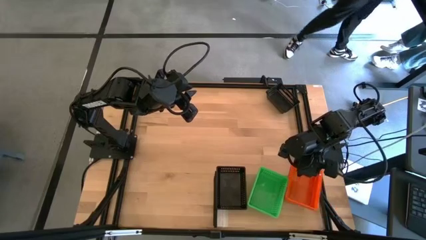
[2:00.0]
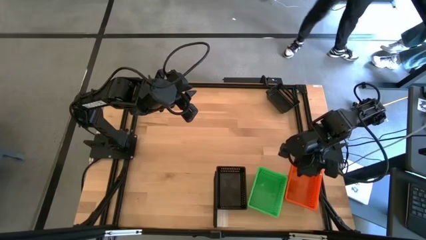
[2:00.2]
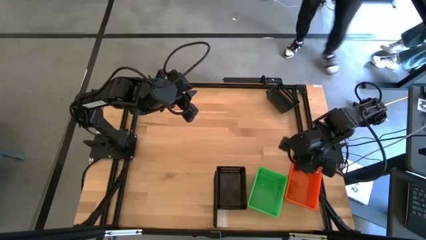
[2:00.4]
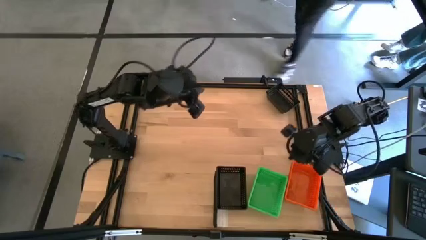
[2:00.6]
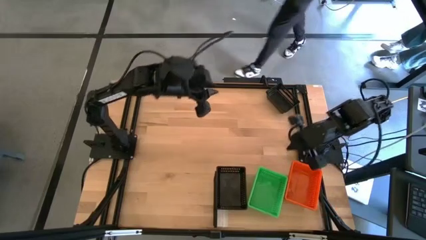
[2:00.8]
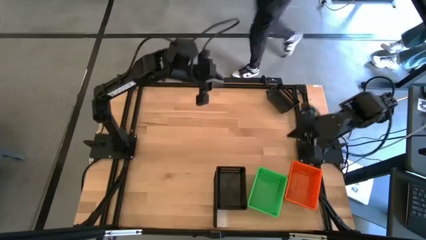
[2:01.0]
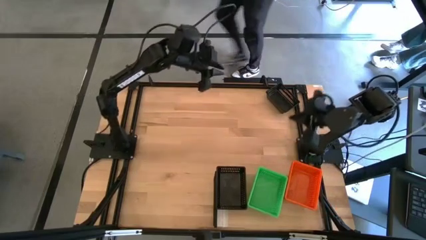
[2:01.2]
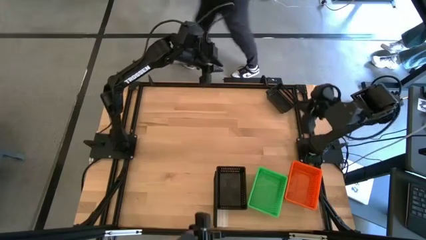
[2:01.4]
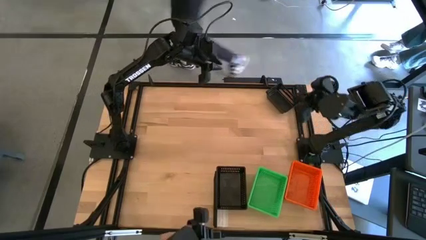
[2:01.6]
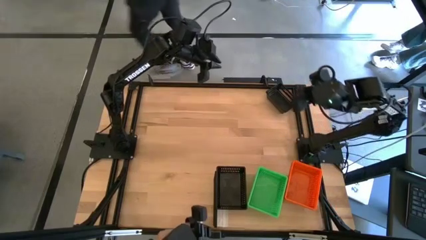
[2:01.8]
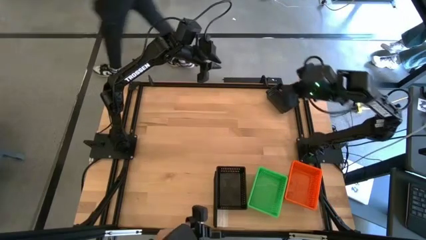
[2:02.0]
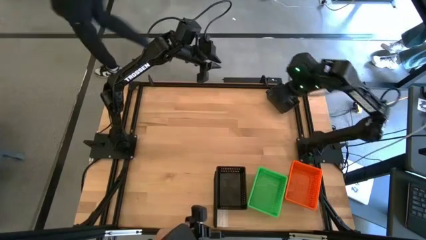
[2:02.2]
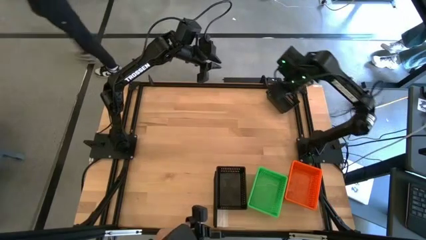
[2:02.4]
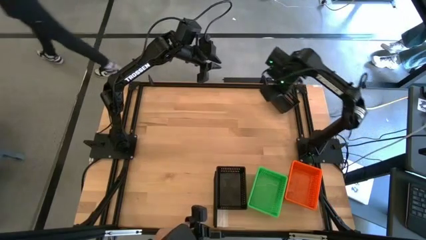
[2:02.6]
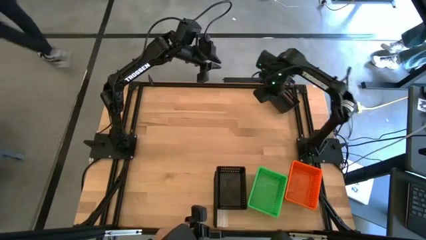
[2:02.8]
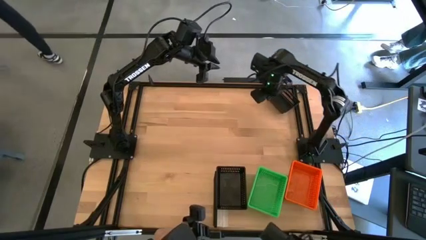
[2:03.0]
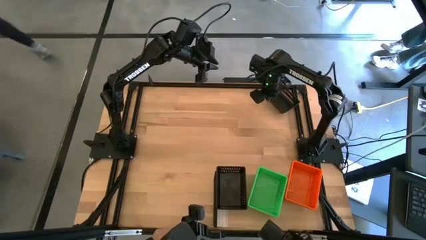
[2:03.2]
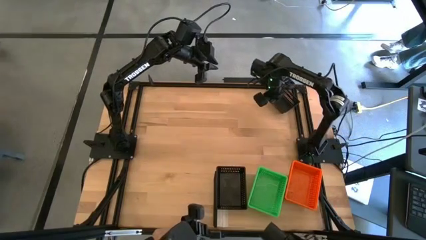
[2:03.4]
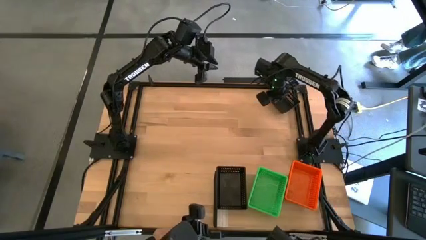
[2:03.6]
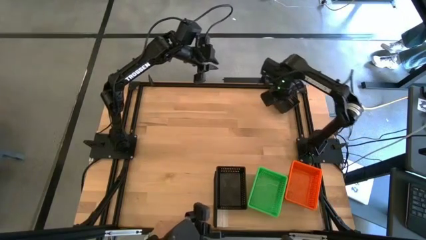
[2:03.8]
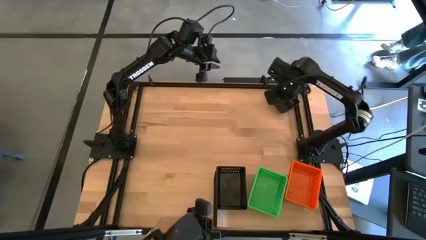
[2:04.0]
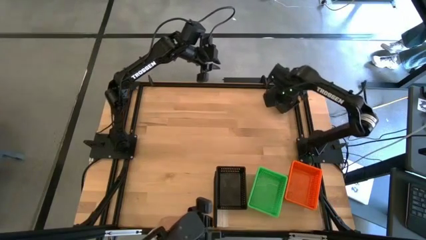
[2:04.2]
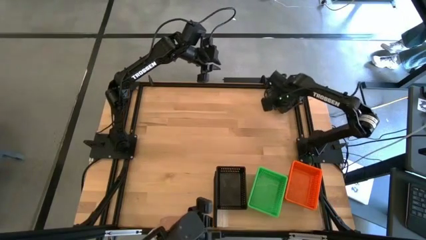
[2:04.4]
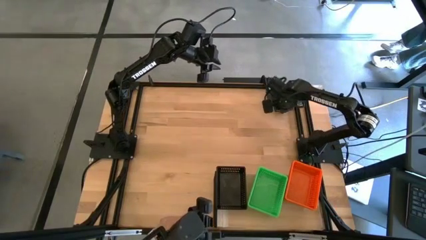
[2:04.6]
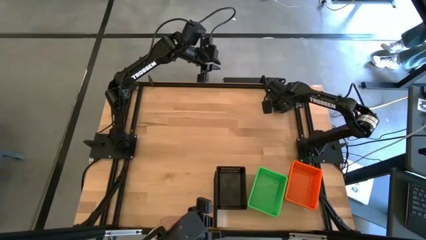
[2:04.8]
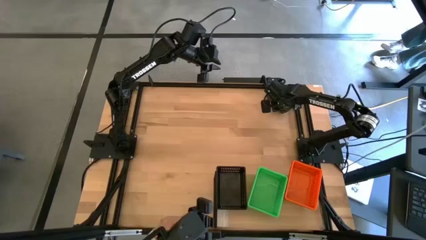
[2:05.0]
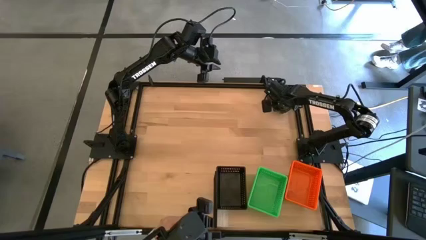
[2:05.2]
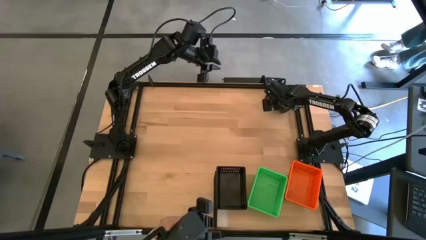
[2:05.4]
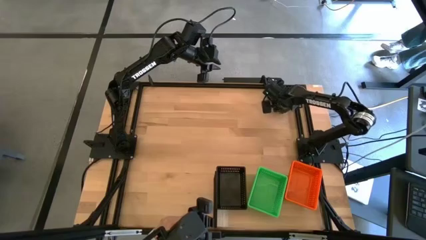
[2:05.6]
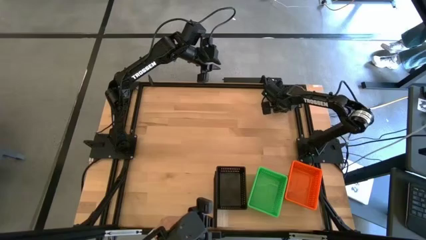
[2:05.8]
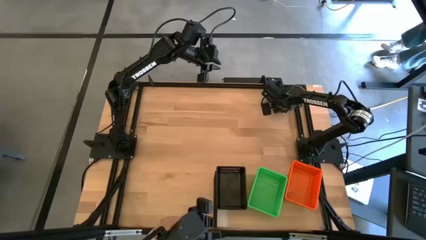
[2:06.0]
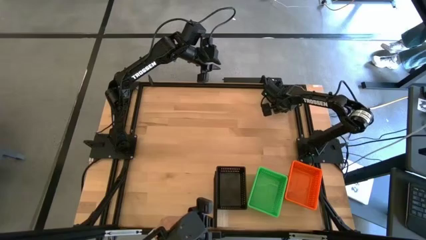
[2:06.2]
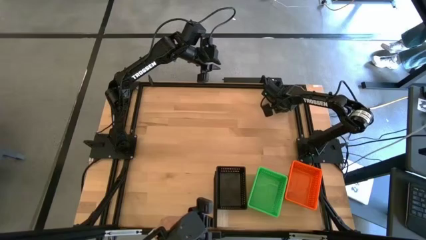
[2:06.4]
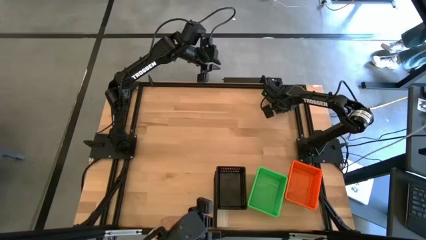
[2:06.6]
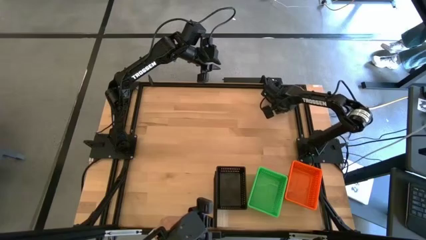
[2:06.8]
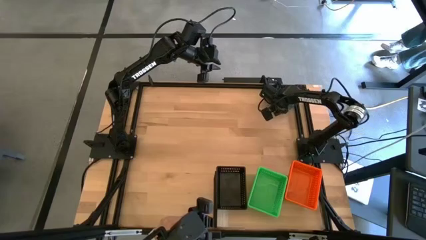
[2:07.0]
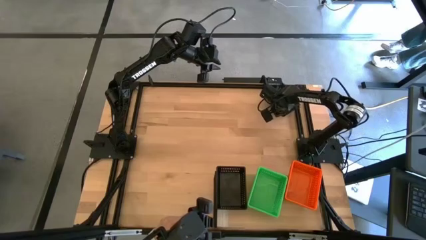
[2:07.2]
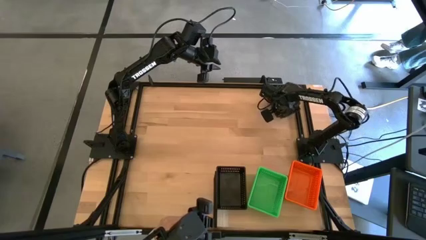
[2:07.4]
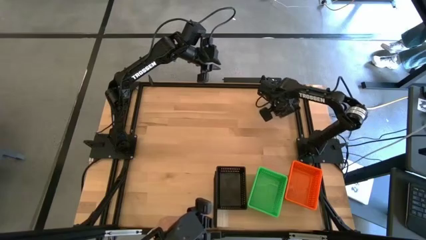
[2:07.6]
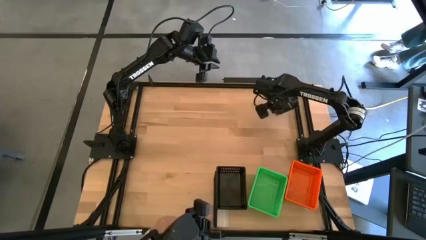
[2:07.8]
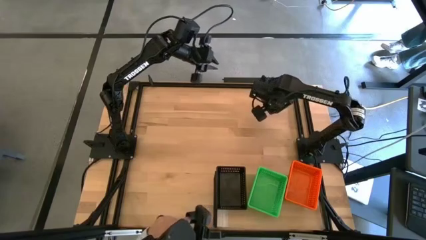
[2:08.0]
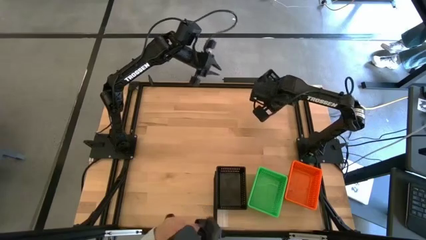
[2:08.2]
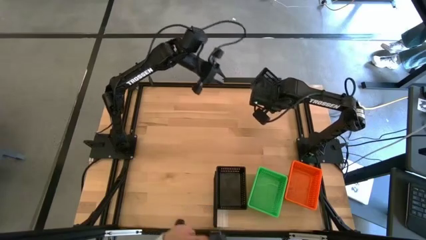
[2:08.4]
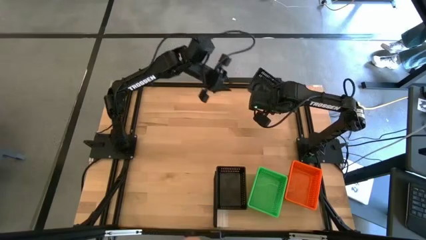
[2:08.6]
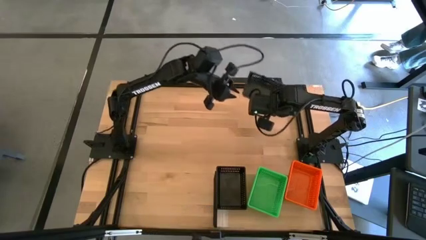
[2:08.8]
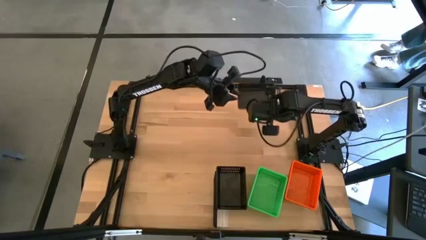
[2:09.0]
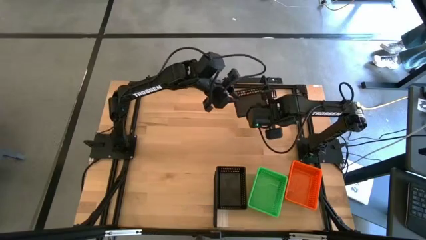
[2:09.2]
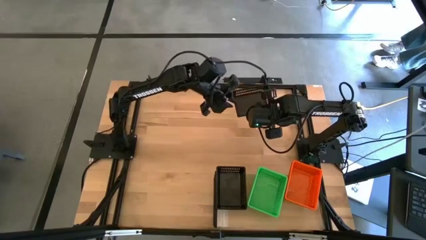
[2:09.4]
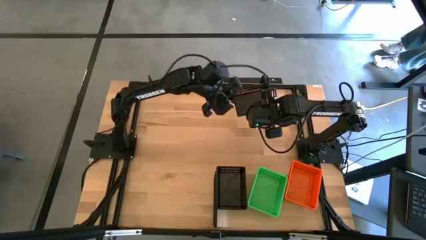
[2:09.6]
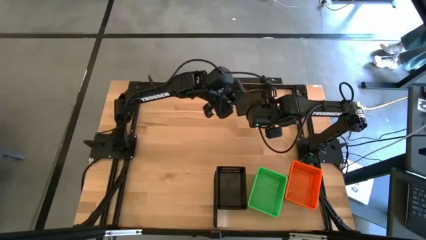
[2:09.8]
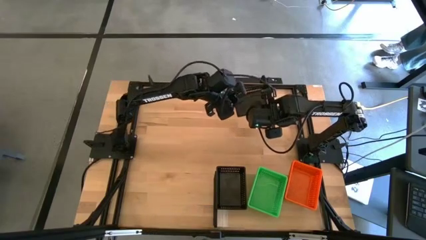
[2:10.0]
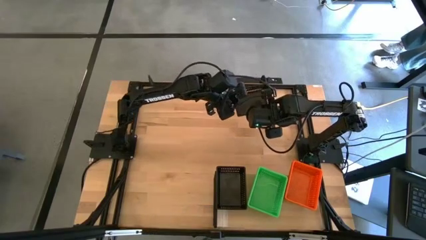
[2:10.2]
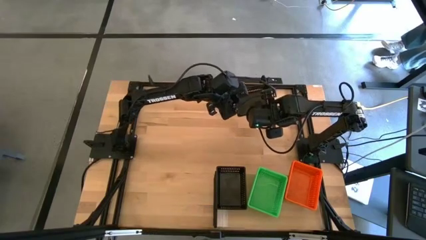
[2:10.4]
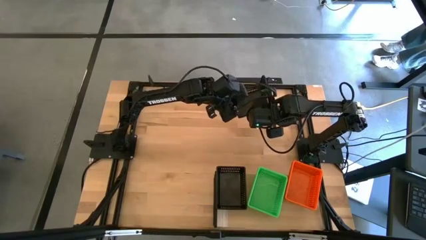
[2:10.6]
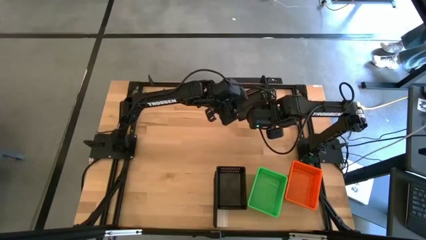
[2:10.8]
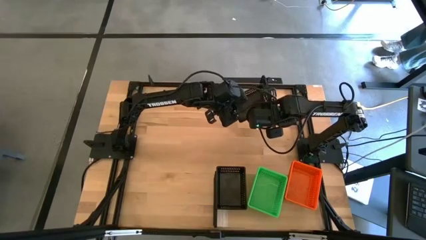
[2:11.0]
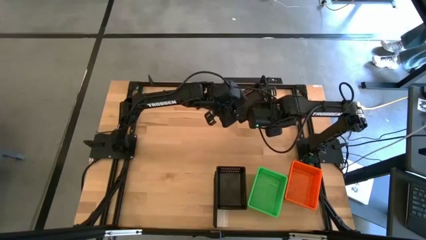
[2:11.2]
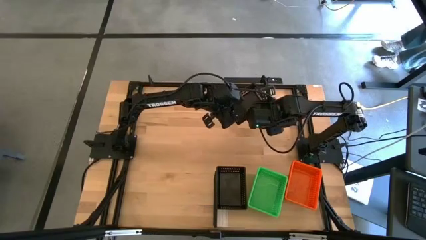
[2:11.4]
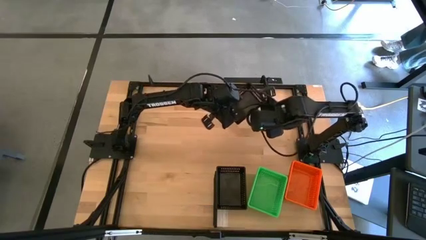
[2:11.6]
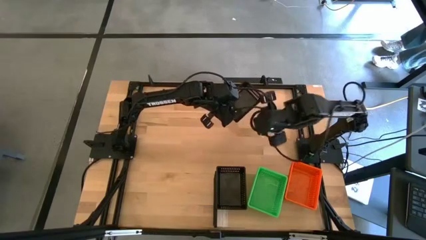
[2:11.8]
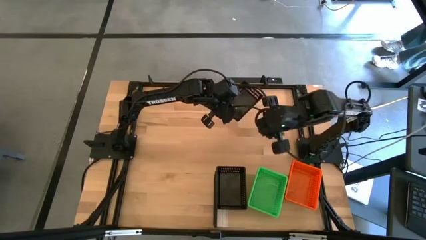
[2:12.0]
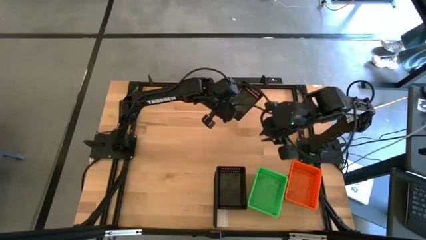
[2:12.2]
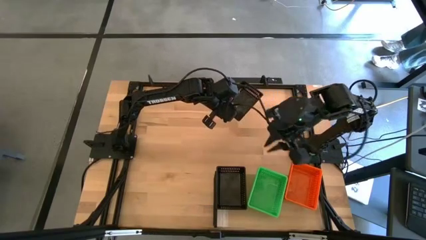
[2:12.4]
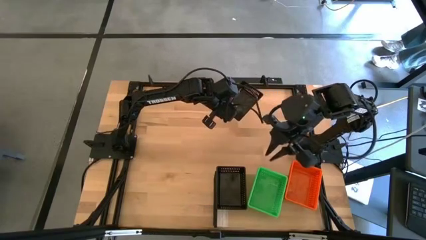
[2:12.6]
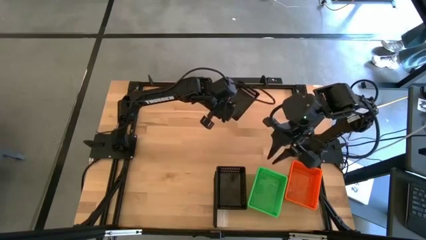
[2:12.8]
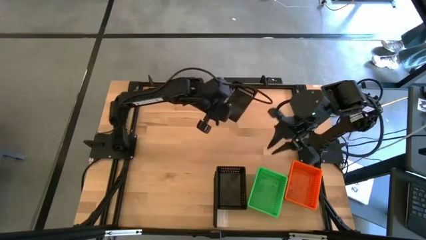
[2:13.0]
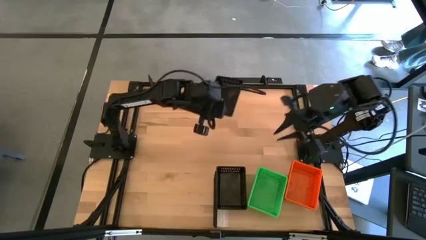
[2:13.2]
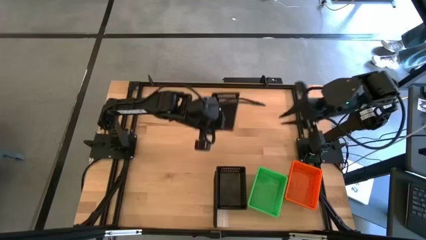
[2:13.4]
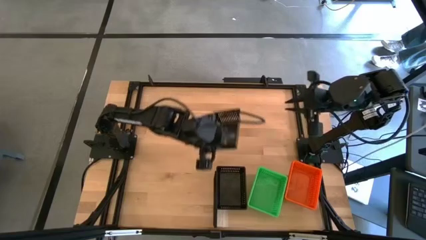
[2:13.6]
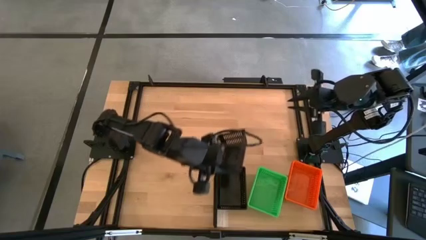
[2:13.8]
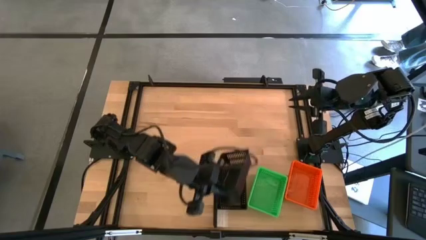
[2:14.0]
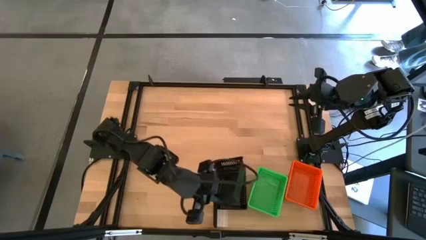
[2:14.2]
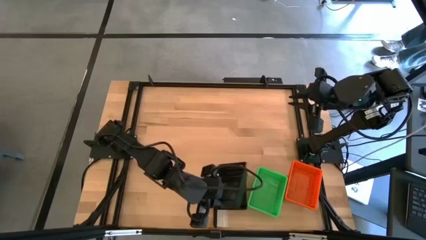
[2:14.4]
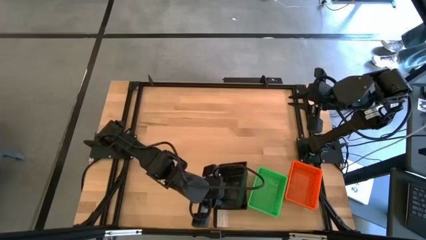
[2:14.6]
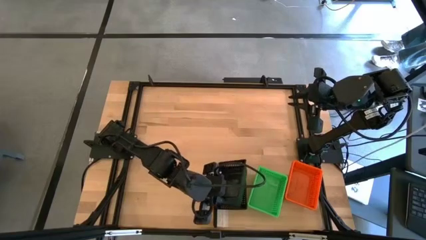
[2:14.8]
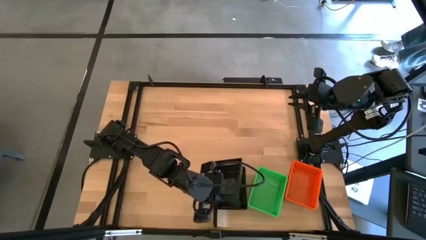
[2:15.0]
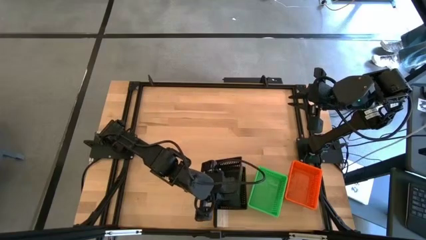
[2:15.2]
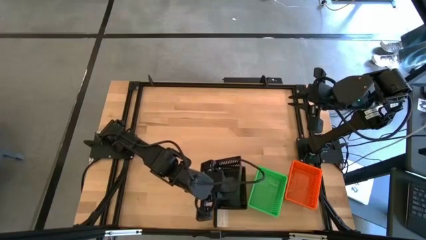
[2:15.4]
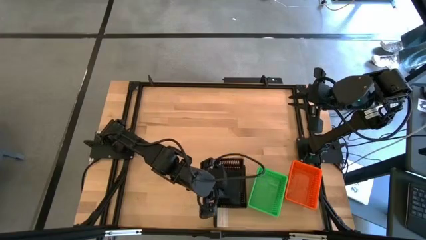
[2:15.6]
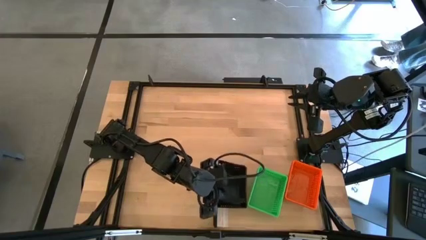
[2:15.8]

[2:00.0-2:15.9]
Task: Stack baskets on shelf by color
Stack the black bin on the stacked black bins on the shelf
